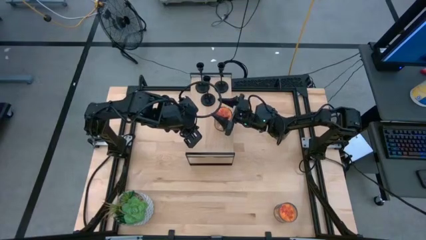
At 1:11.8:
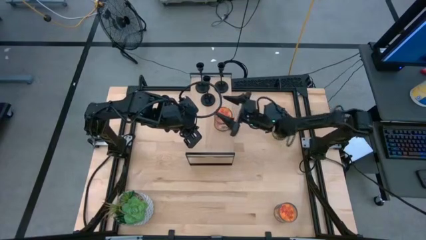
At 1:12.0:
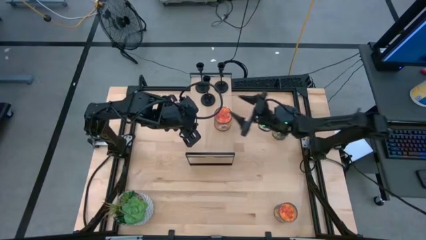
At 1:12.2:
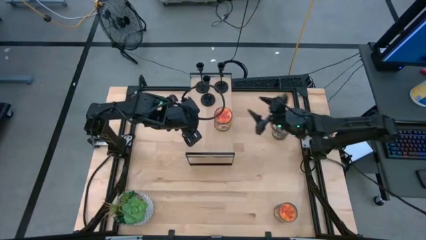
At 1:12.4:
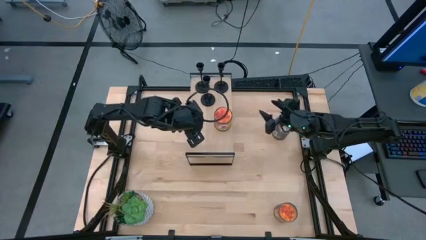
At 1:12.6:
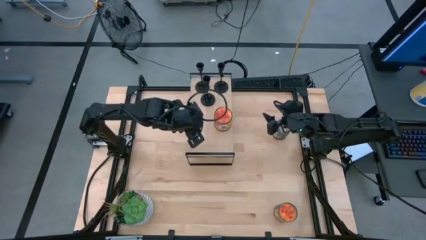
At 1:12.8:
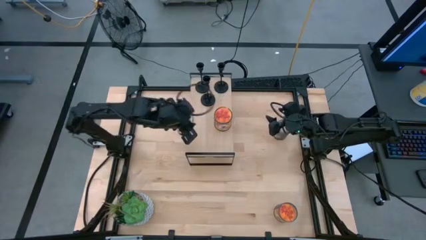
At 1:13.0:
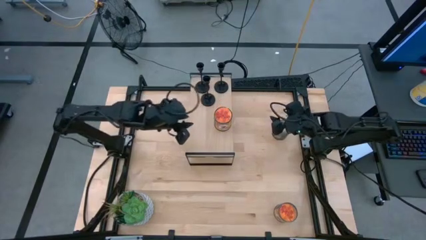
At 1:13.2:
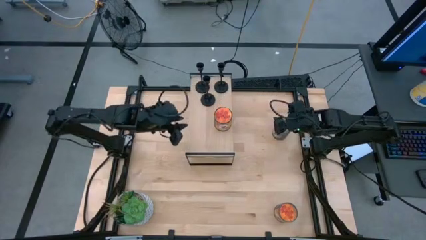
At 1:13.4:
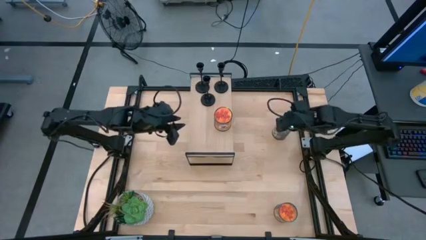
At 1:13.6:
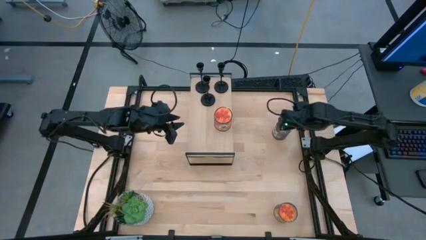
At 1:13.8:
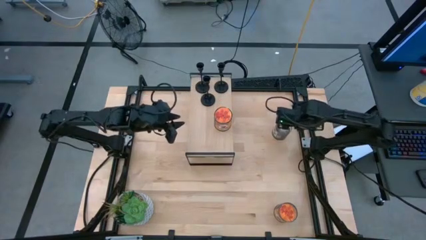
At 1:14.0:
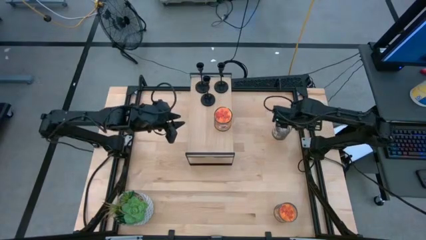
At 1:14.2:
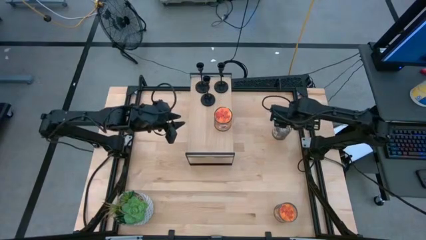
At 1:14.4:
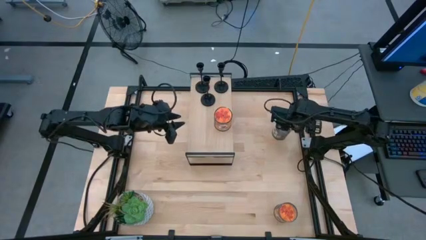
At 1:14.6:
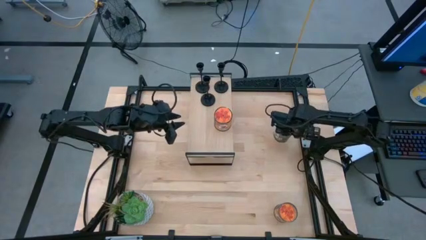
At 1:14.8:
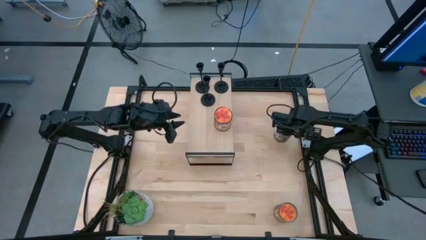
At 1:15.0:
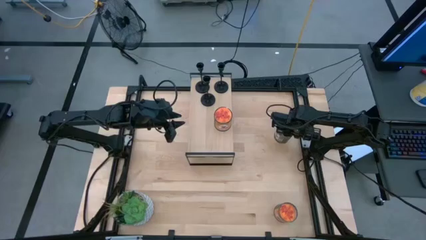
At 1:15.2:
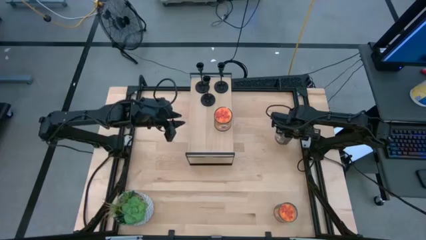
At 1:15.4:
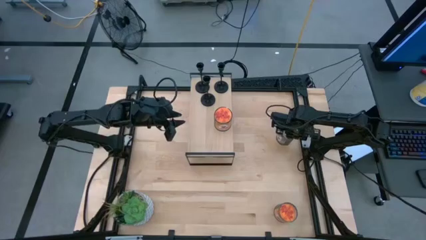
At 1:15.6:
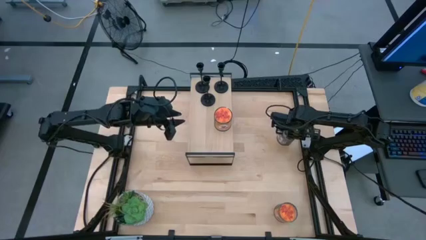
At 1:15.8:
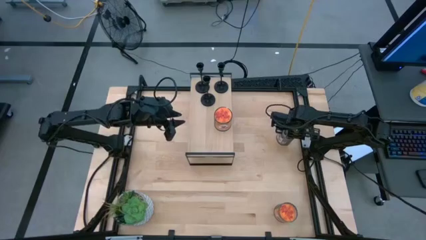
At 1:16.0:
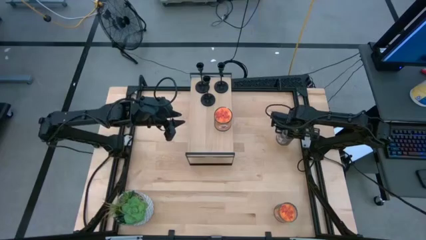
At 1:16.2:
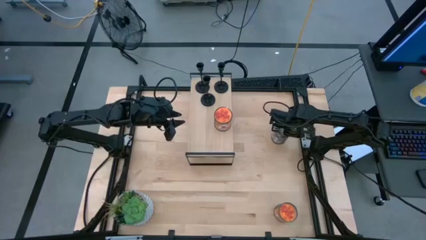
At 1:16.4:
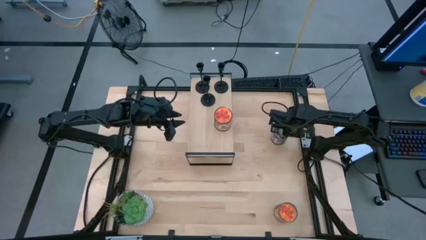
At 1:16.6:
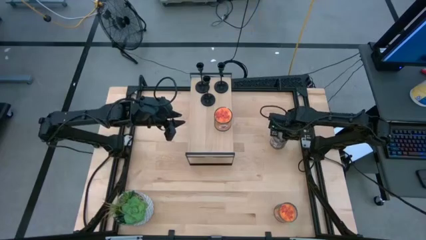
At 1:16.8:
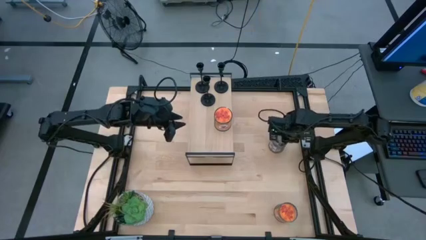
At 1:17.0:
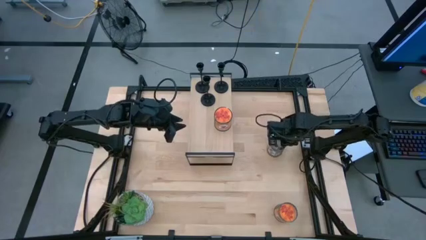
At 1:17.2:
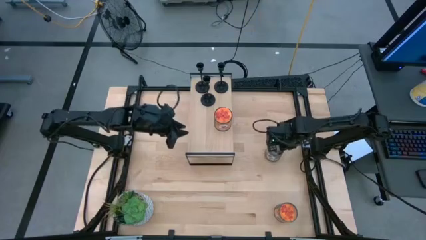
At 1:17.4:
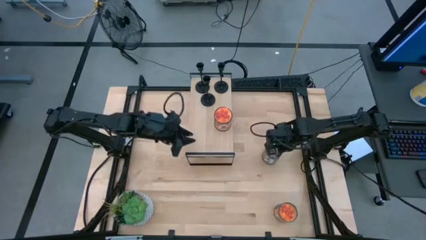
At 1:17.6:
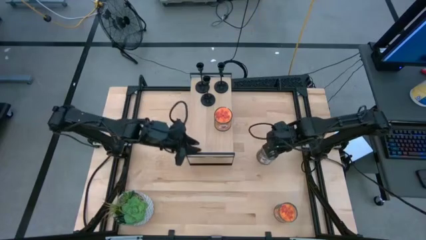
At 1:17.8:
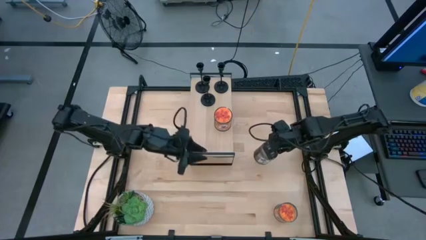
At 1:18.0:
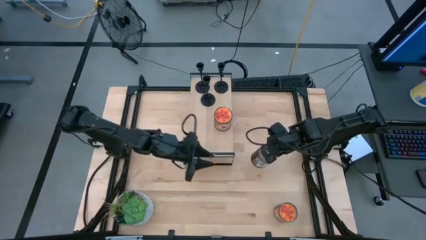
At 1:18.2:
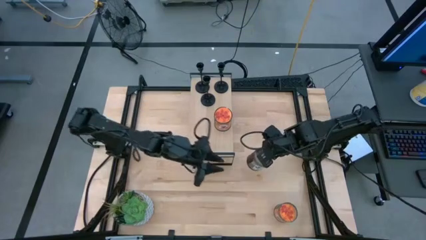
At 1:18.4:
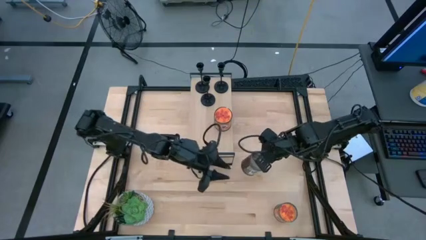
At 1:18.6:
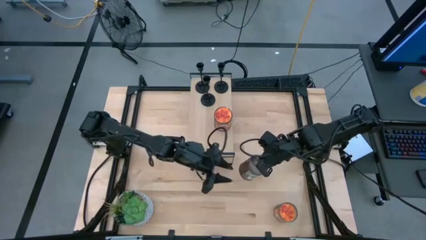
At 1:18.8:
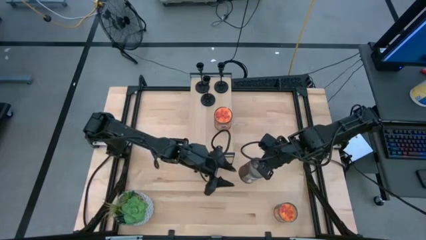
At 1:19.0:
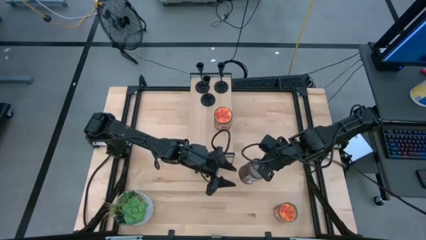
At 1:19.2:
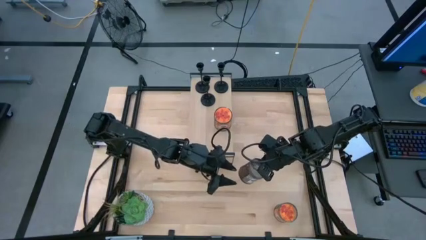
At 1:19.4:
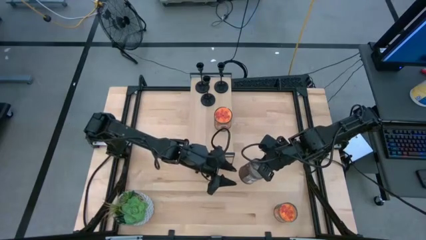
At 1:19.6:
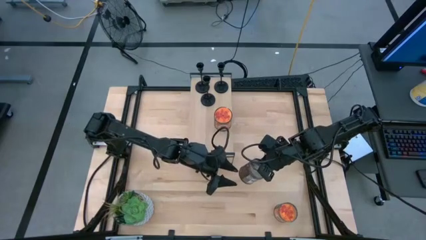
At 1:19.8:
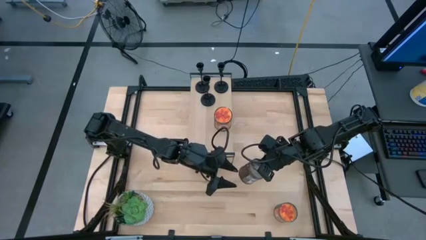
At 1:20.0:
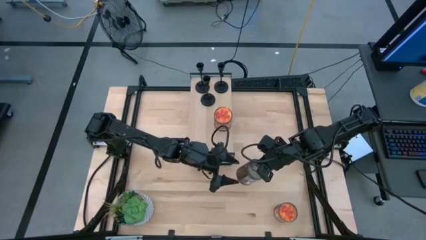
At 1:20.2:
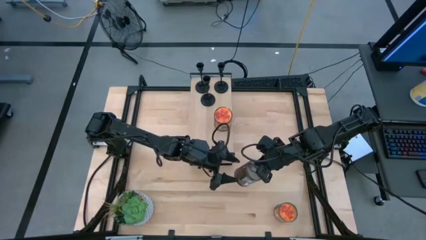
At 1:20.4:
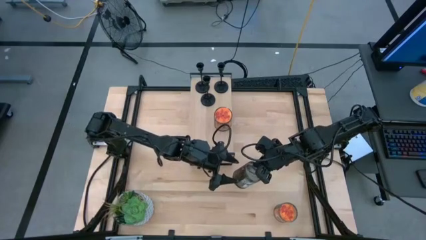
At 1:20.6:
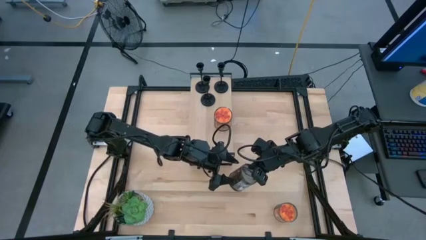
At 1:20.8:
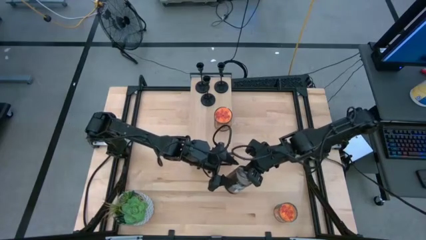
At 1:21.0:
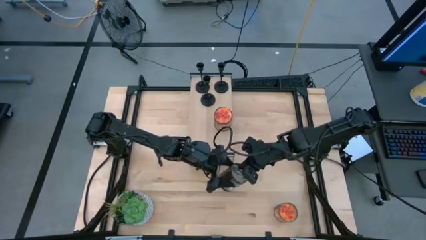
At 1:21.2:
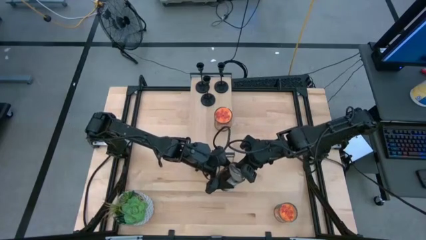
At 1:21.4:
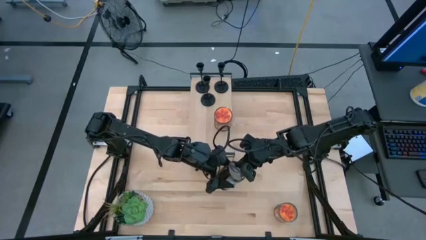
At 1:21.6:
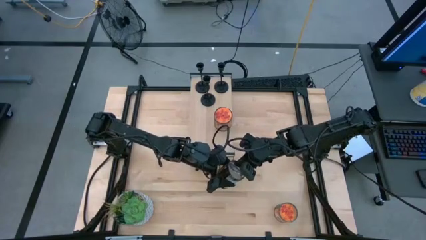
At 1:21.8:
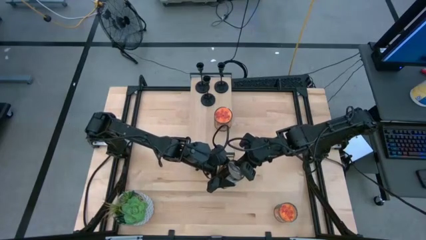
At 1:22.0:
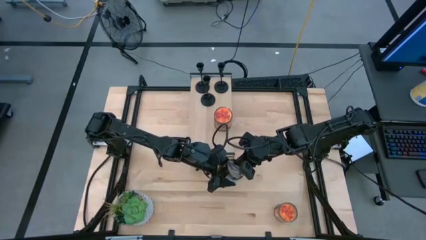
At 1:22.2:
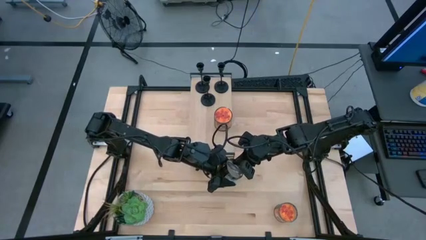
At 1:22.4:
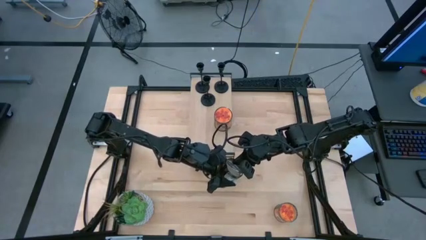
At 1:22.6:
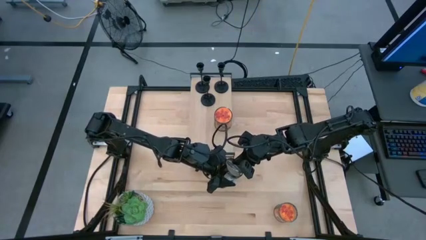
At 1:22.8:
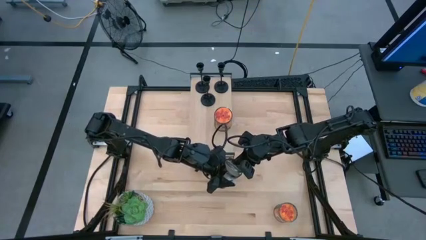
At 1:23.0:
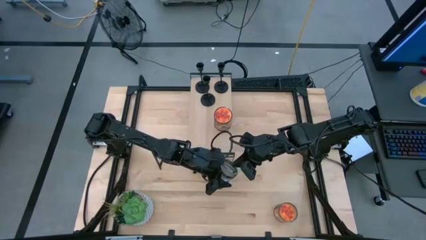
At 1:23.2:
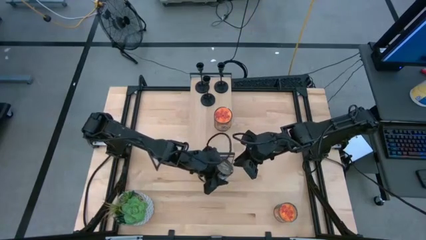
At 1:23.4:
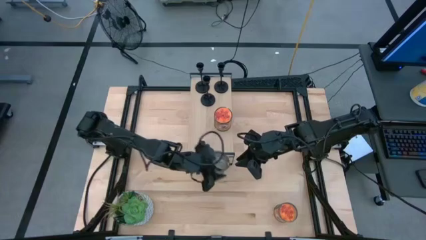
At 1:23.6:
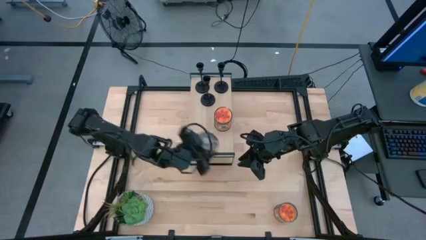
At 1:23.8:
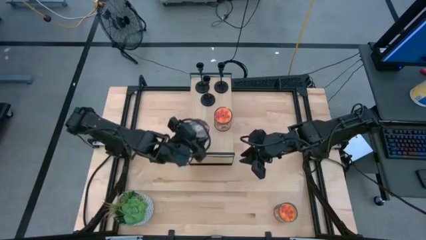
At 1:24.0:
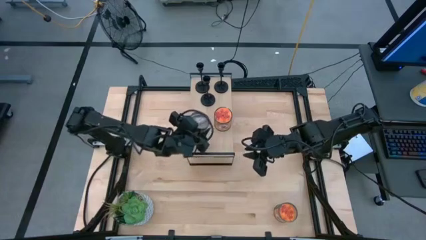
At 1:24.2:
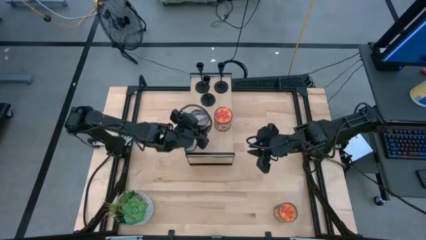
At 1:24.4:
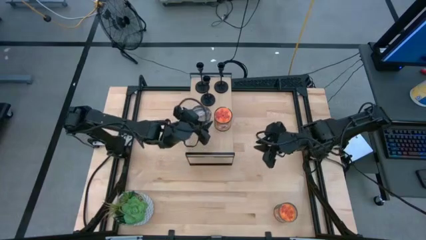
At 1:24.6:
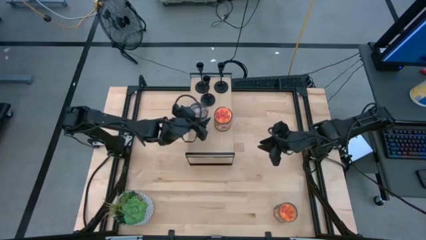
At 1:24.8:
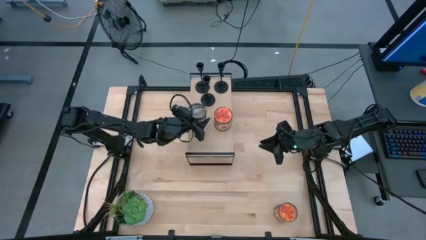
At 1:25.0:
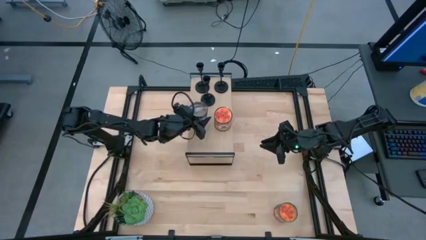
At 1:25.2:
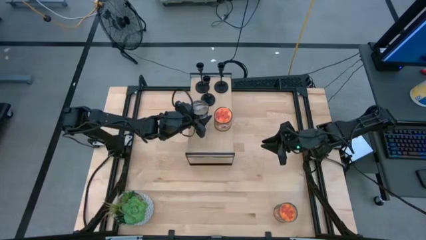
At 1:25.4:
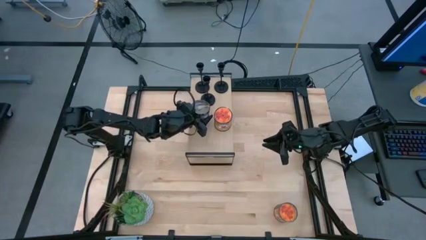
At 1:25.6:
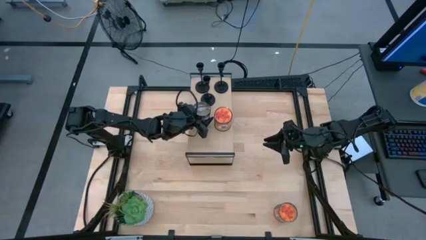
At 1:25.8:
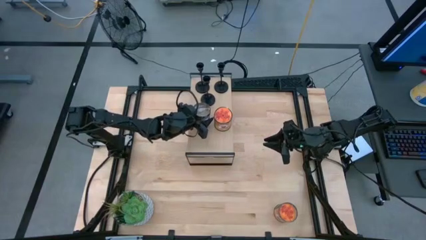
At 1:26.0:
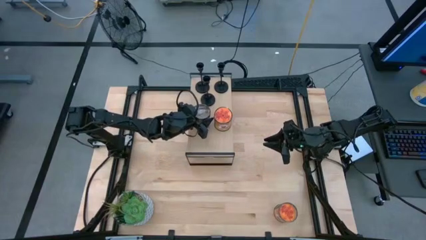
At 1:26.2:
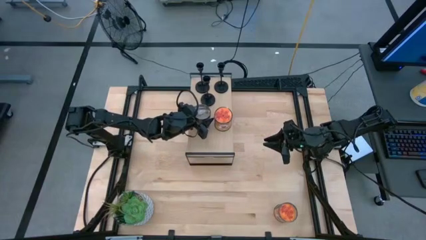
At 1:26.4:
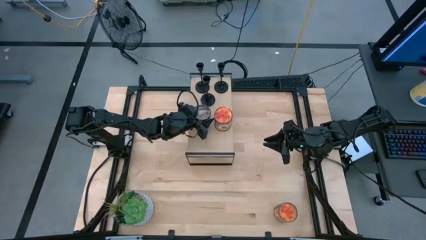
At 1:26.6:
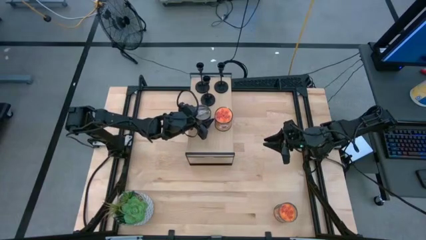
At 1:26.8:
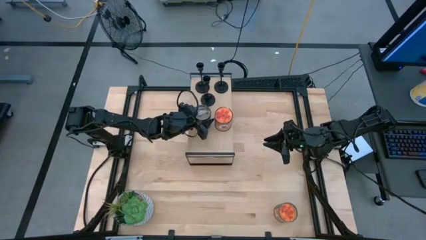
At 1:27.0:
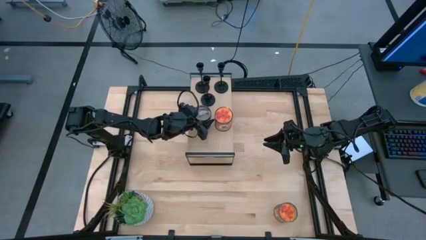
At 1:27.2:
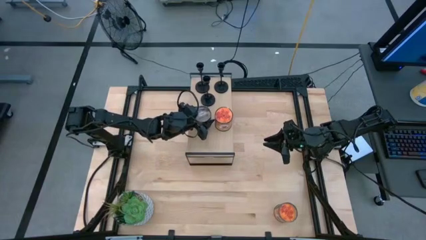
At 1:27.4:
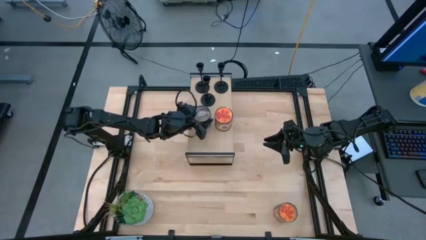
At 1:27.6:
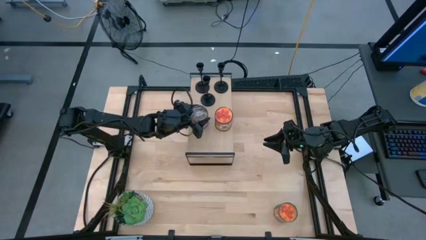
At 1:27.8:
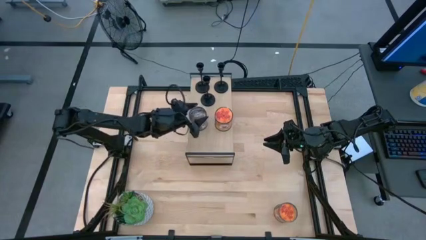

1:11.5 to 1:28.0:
Task: Pick & Place candle stick holders
Put the brown scented candle on the shelf
